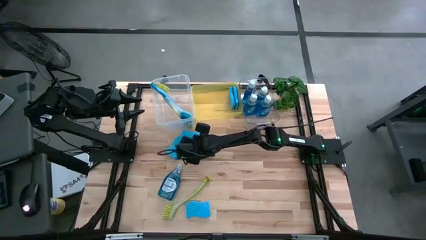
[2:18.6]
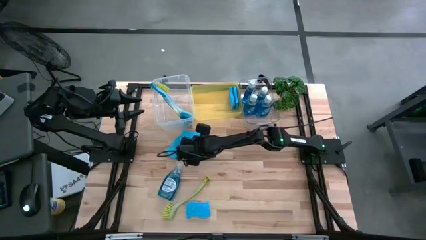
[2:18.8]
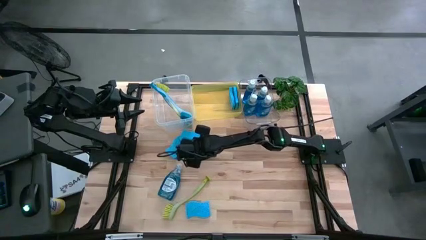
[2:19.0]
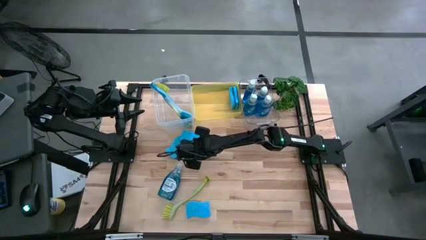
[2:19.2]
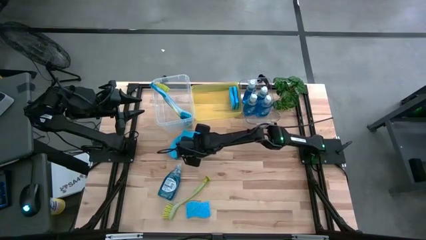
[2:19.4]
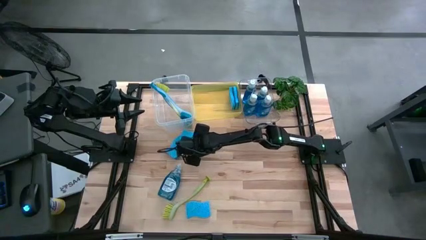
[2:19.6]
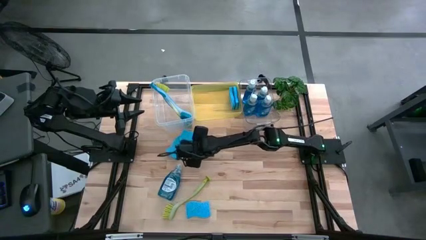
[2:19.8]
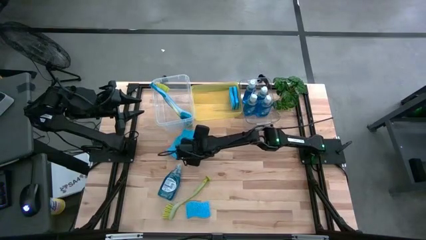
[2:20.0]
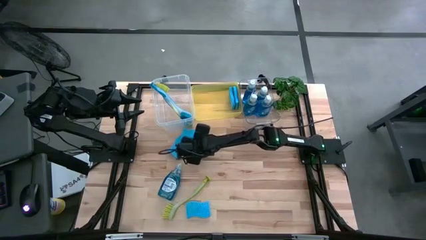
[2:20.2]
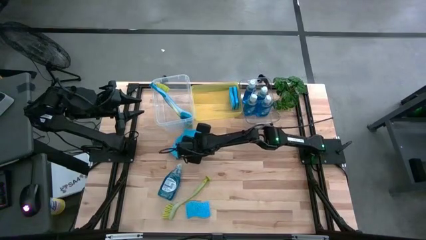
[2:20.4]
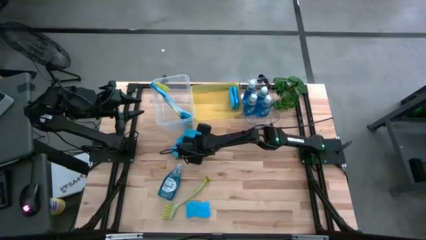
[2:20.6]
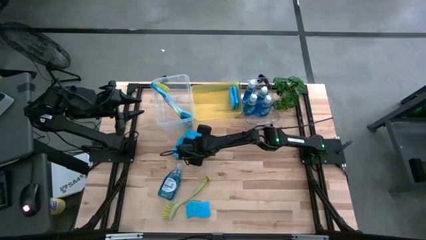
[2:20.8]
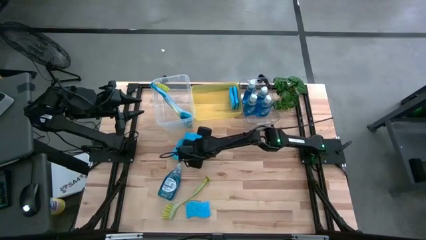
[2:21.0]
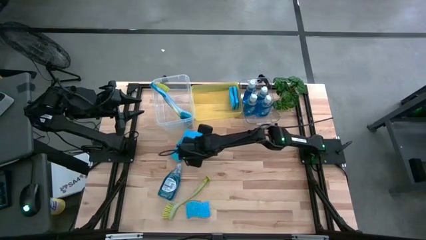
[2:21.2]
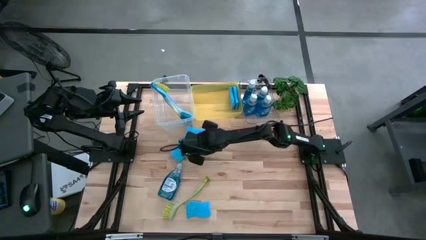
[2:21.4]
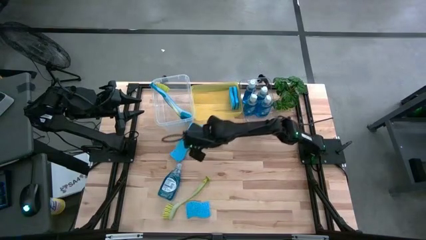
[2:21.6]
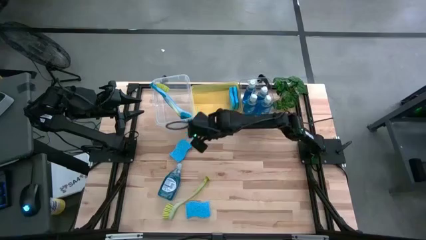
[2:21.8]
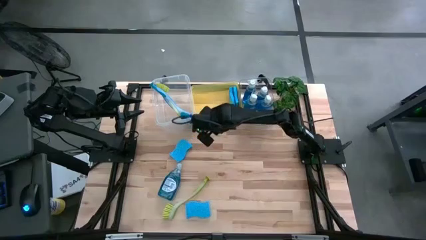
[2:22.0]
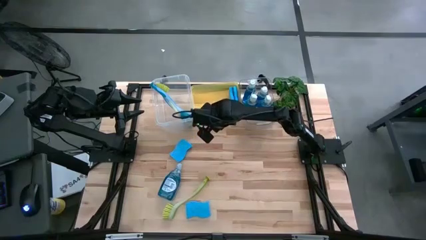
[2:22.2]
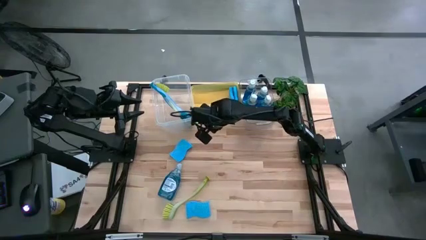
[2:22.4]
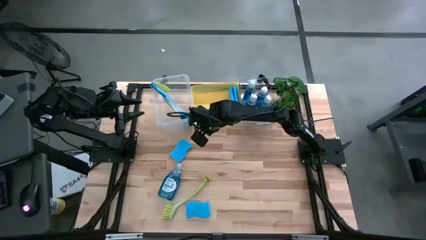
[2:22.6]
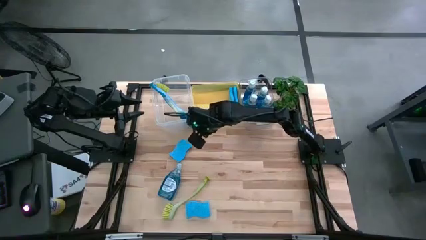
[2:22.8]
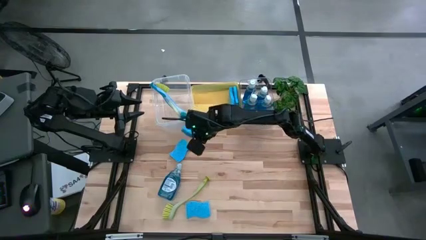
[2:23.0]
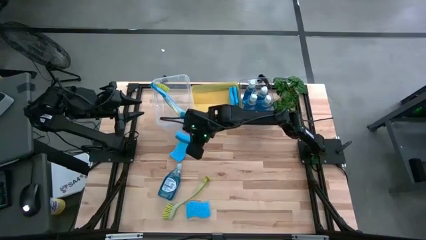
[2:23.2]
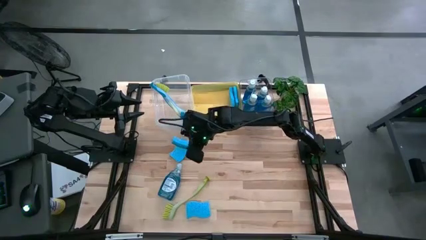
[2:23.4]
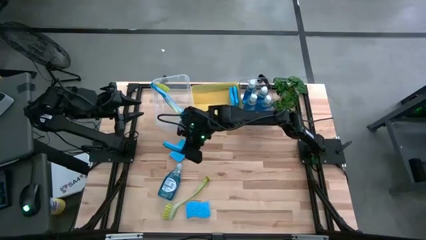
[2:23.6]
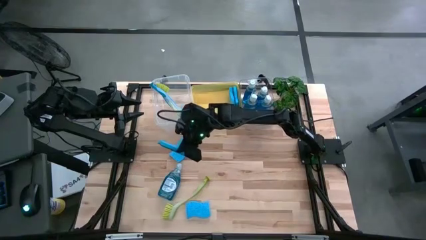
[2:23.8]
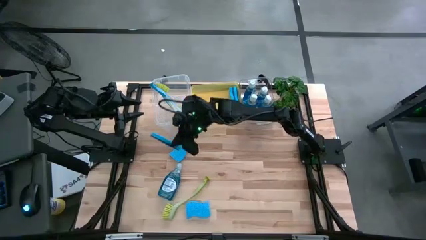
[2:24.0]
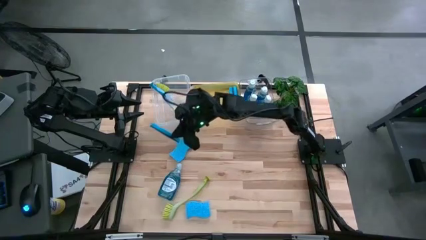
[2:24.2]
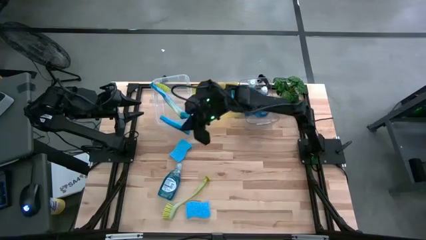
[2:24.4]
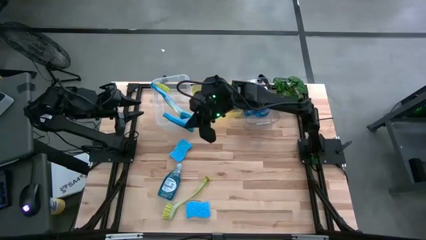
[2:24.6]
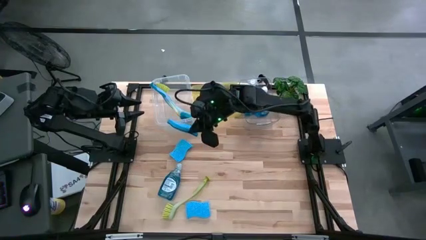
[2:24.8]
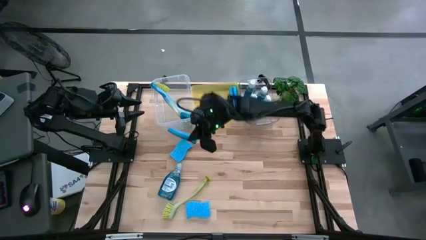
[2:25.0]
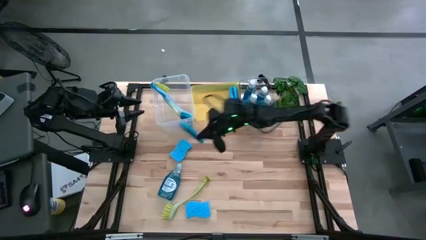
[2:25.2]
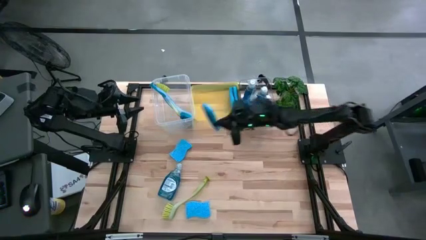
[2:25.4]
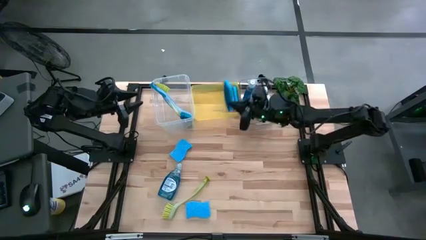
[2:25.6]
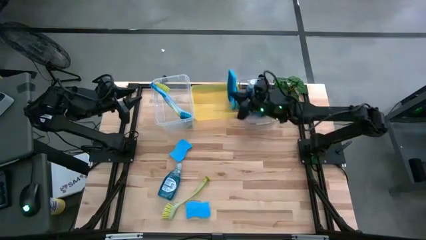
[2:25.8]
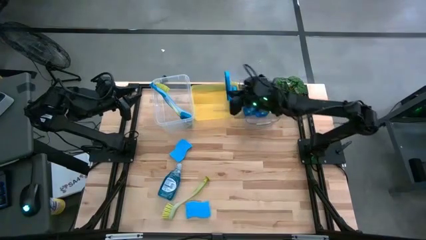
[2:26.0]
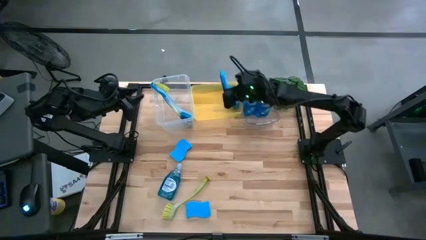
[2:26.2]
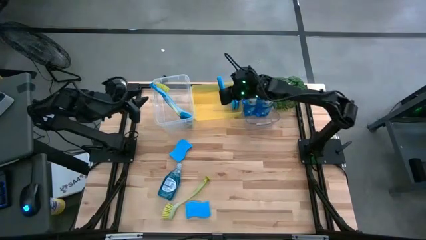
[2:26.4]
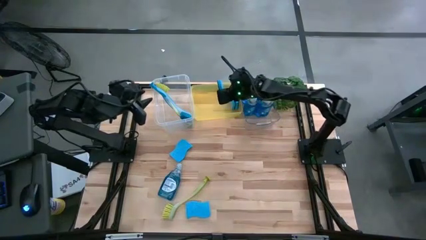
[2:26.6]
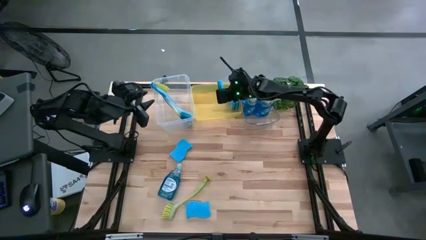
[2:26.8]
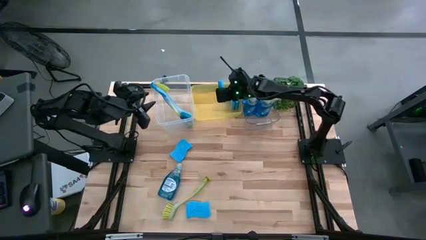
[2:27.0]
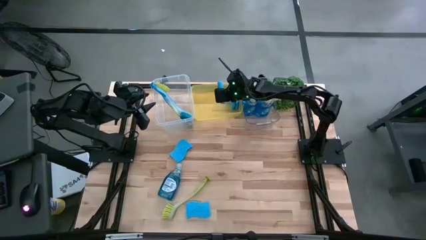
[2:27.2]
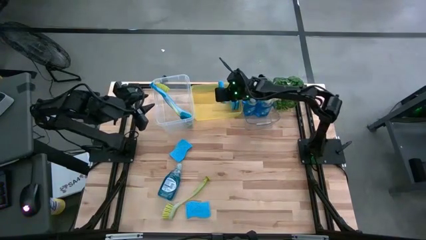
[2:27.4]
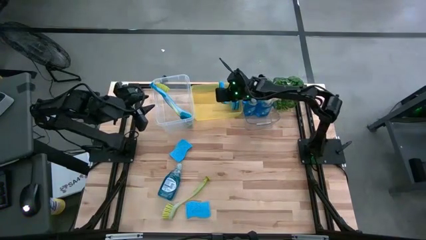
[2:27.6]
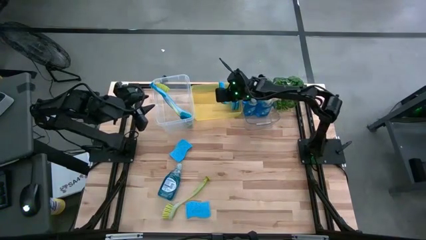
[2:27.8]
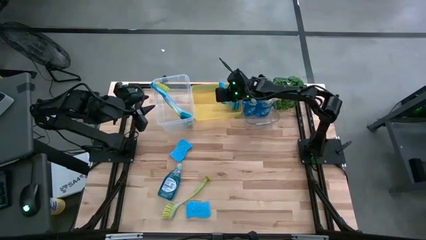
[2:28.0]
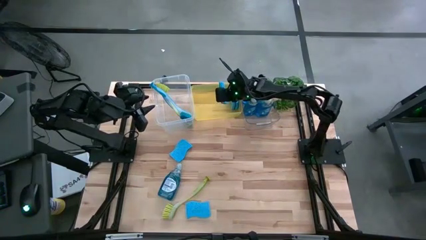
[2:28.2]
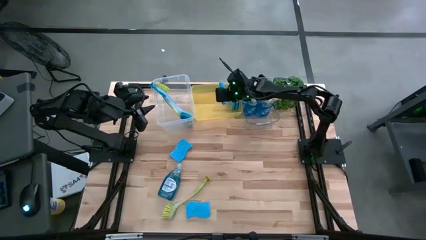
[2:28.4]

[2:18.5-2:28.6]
Task: Pick & Place Kitchen Sink Supplies
Put the blue sponge into the yellow bin

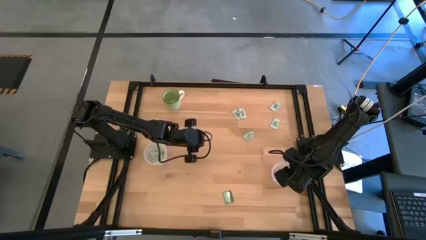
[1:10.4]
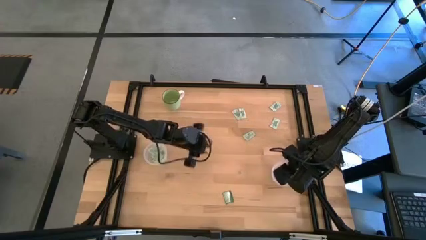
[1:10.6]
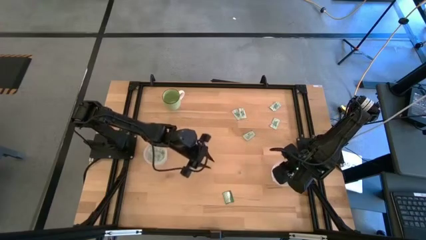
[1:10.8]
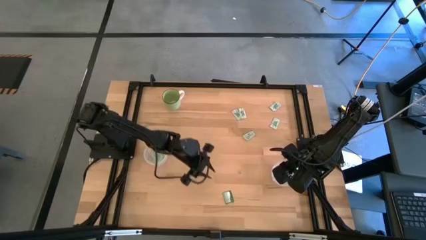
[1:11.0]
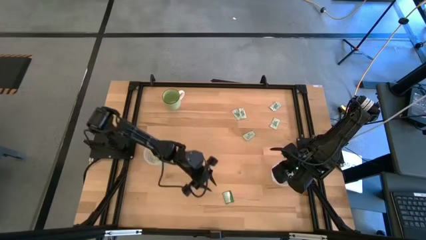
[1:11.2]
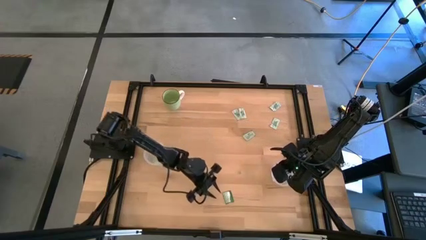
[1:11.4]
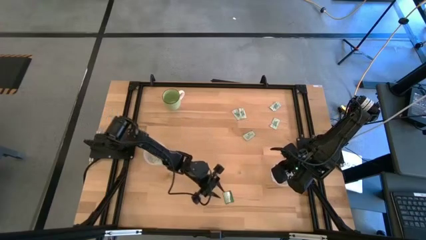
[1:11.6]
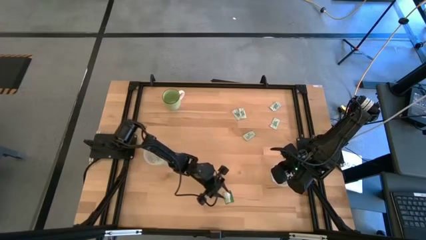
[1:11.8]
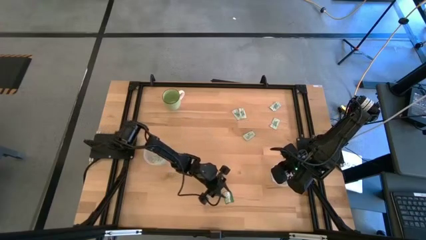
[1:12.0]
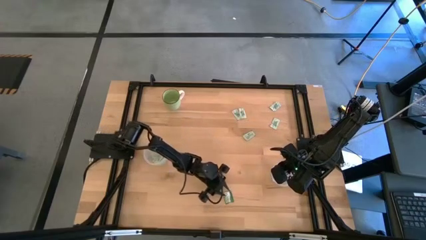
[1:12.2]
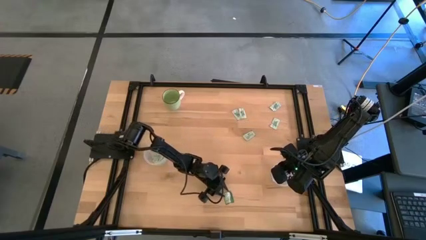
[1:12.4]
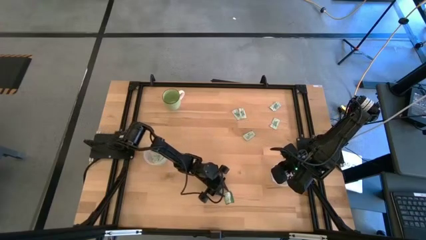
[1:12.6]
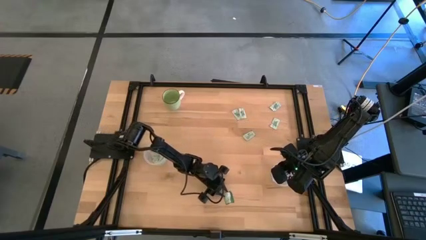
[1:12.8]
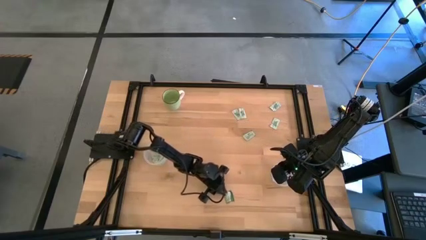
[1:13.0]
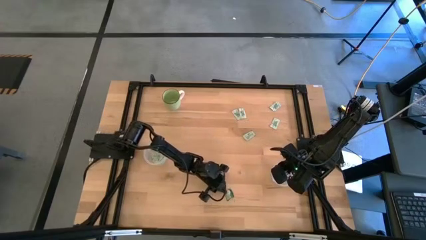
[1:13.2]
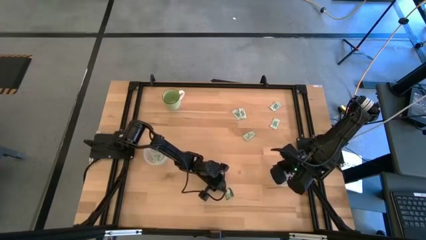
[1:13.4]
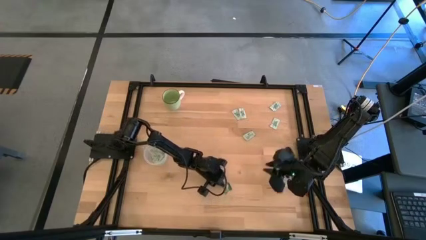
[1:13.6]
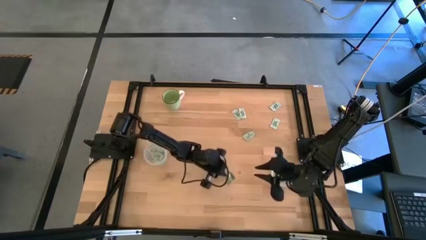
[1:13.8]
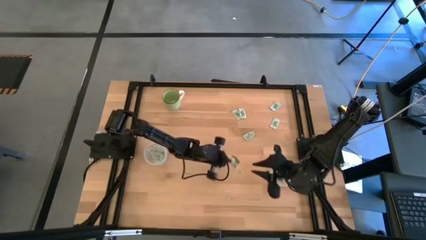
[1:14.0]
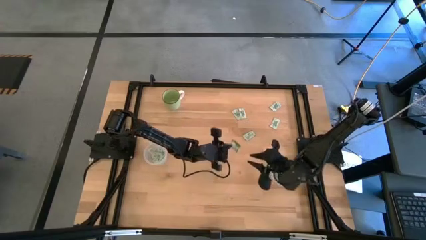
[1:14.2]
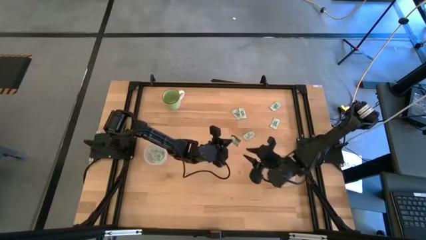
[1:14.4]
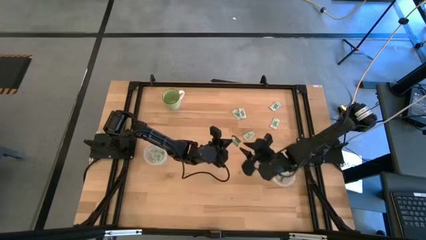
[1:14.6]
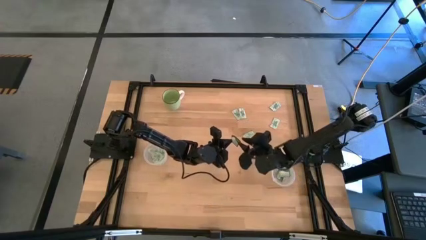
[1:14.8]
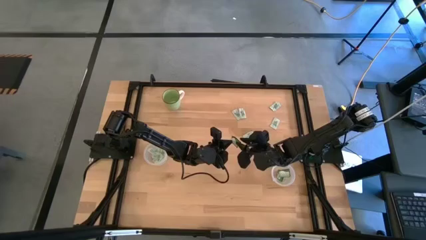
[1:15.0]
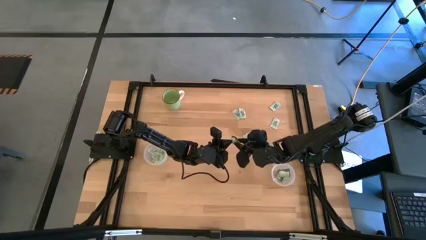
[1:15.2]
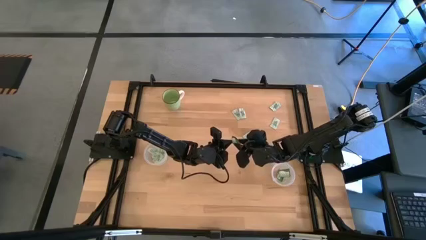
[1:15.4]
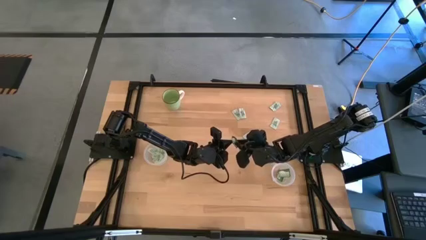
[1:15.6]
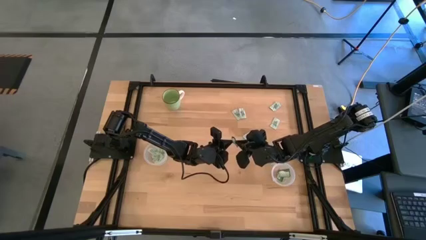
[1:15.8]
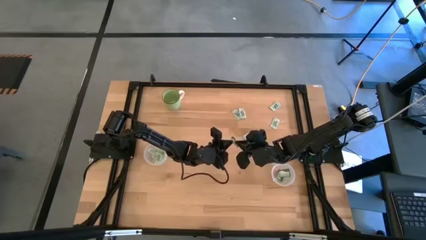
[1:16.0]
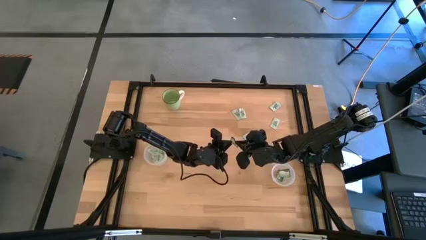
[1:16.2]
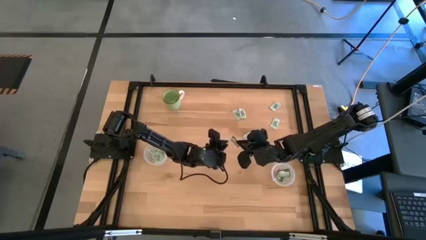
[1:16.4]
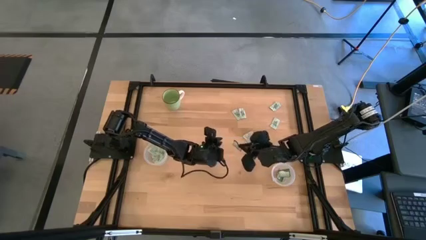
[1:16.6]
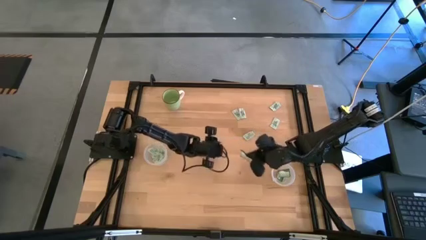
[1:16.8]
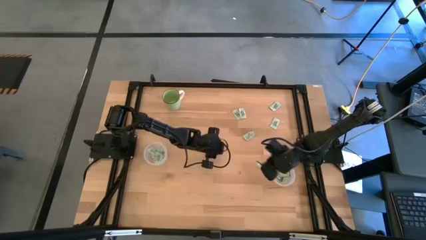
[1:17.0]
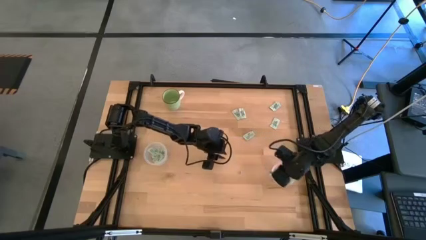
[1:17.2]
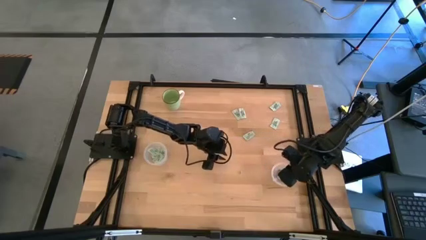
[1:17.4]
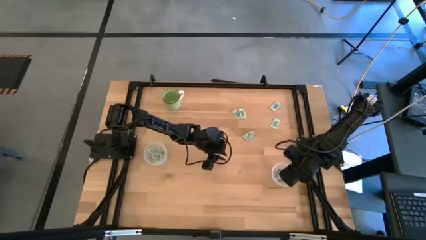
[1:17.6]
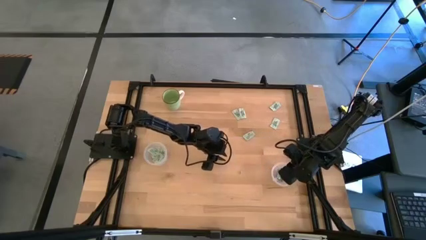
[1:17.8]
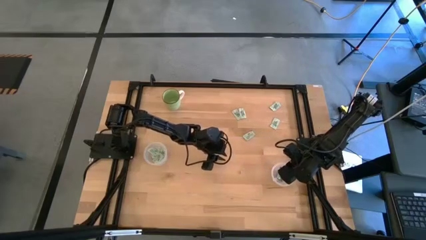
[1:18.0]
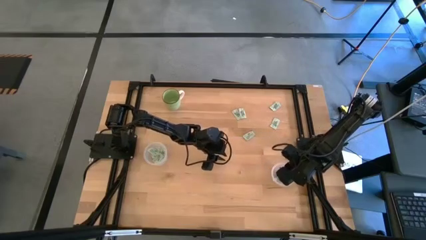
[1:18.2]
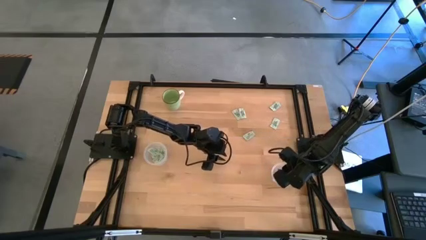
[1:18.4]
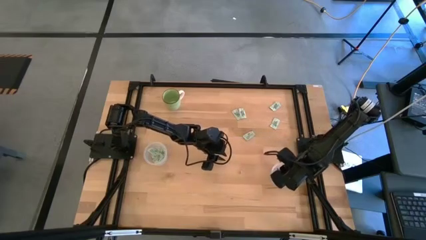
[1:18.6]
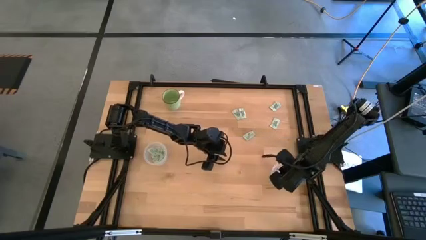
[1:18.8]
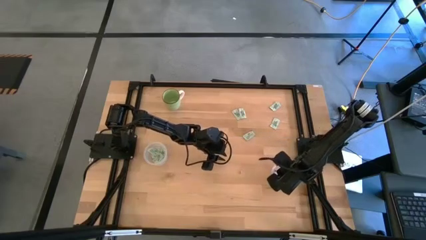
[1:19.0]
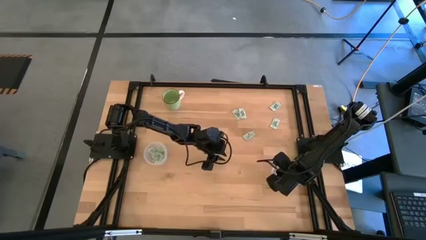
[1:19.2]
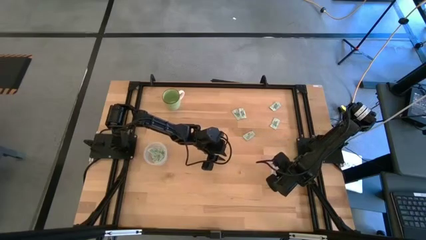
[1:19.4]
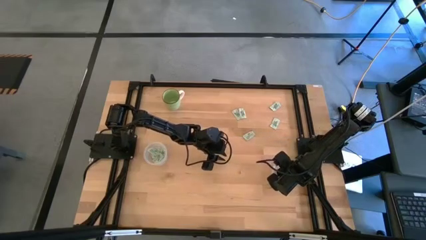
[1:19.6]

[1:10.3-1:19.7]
Task: Pick and place items into bin
Put the truvia packet into the right transparent bin
